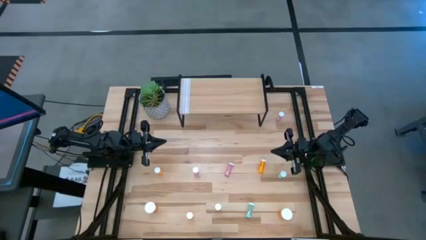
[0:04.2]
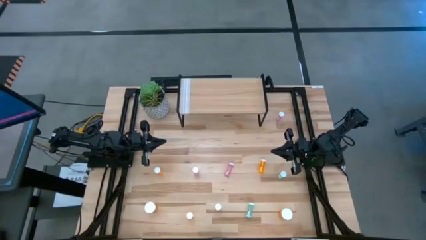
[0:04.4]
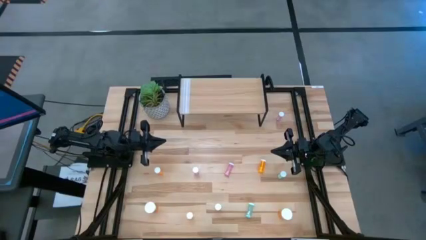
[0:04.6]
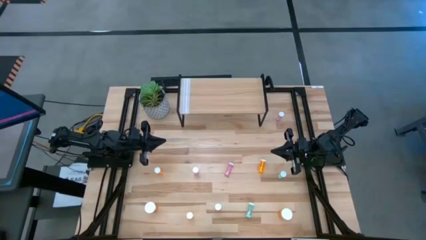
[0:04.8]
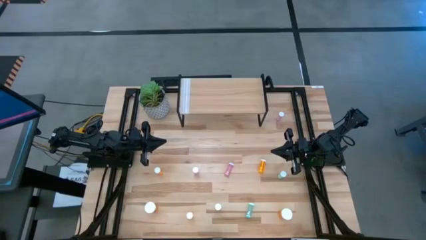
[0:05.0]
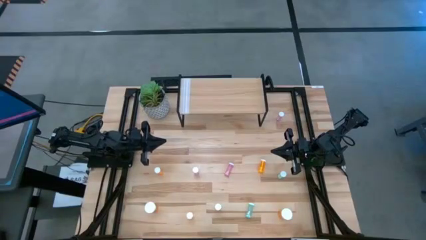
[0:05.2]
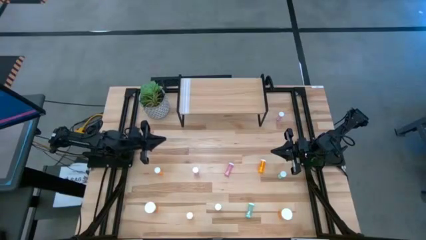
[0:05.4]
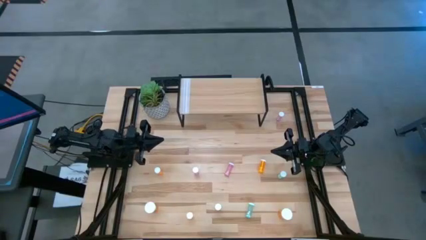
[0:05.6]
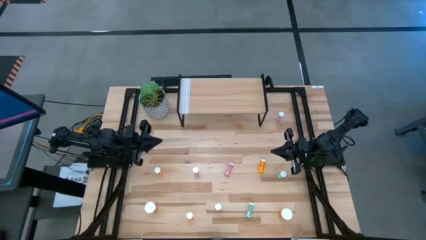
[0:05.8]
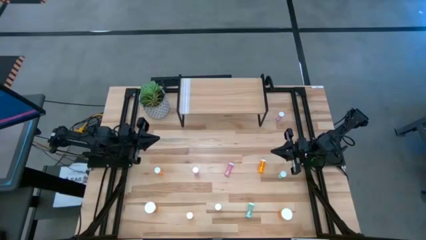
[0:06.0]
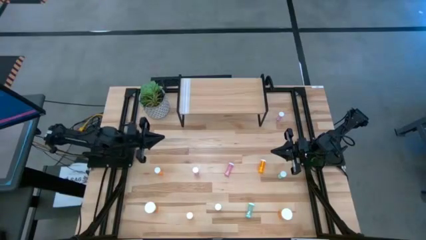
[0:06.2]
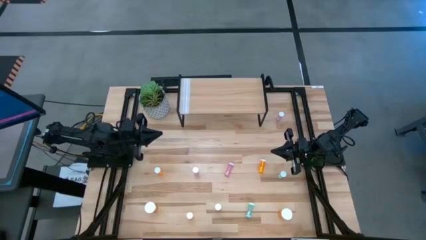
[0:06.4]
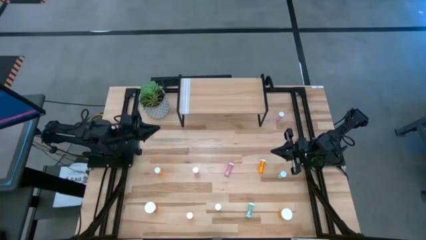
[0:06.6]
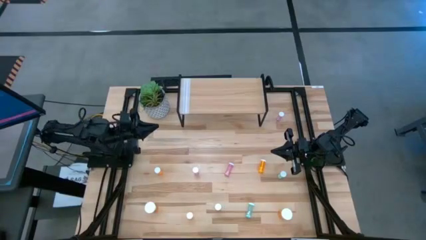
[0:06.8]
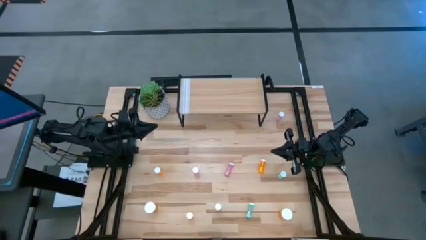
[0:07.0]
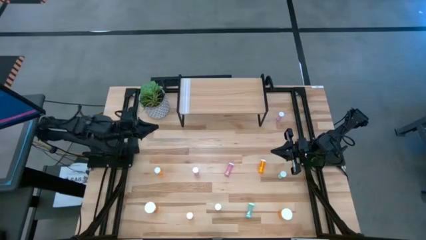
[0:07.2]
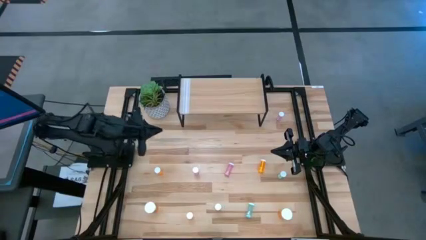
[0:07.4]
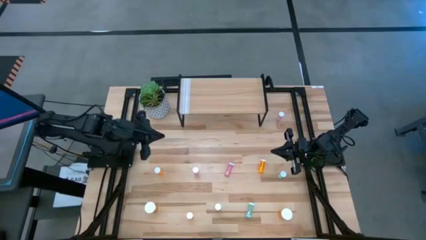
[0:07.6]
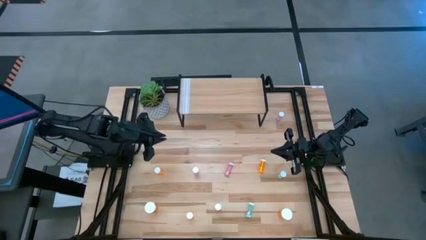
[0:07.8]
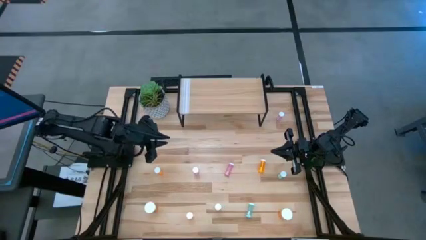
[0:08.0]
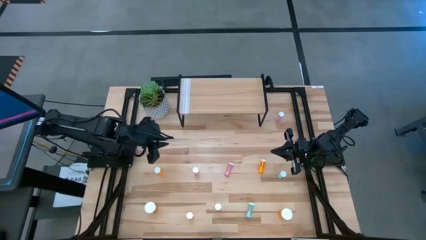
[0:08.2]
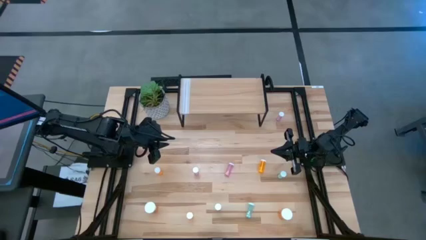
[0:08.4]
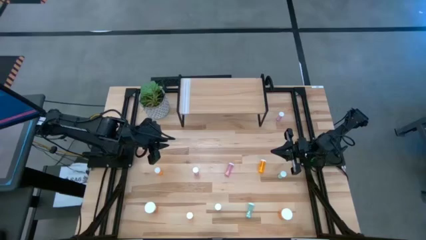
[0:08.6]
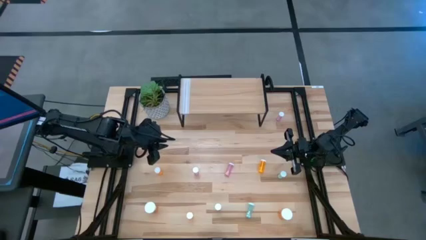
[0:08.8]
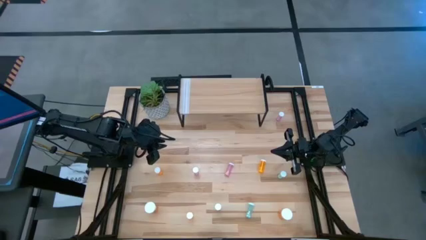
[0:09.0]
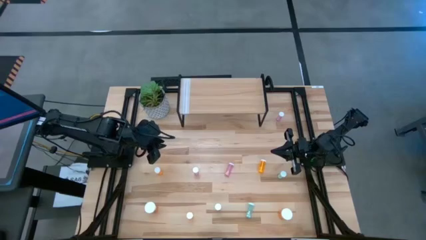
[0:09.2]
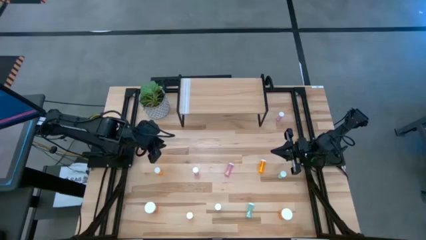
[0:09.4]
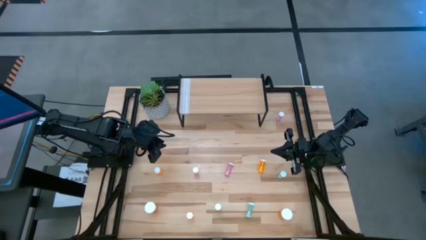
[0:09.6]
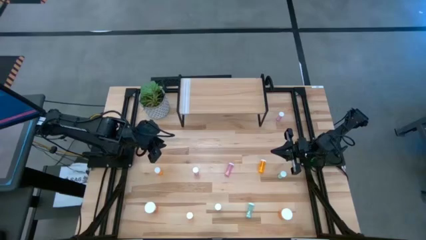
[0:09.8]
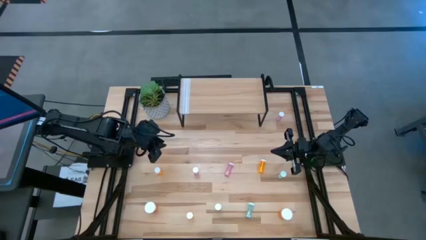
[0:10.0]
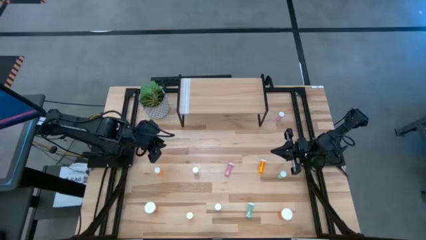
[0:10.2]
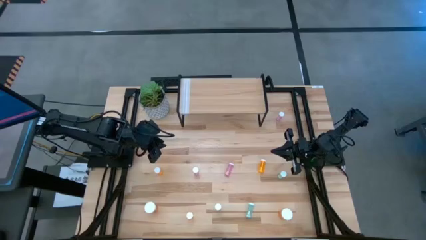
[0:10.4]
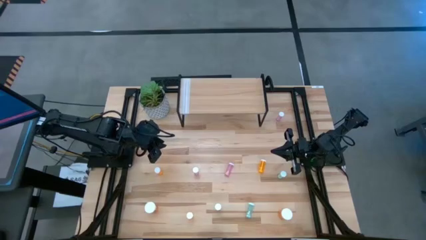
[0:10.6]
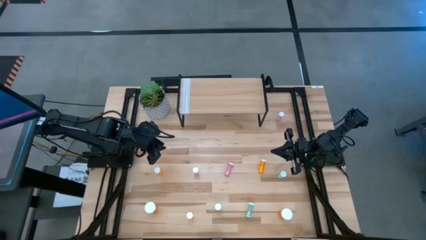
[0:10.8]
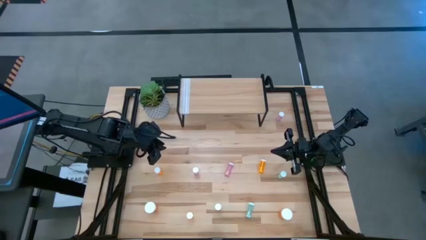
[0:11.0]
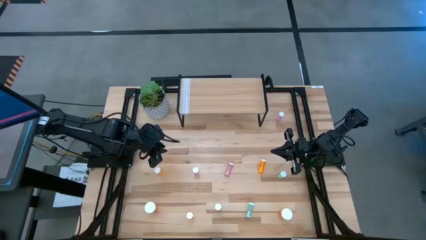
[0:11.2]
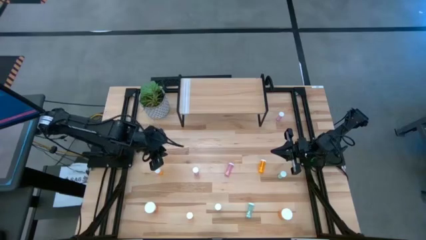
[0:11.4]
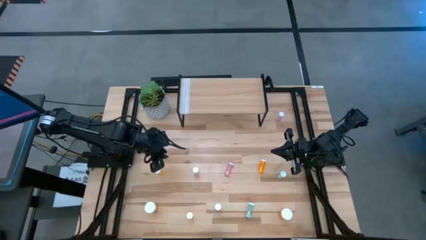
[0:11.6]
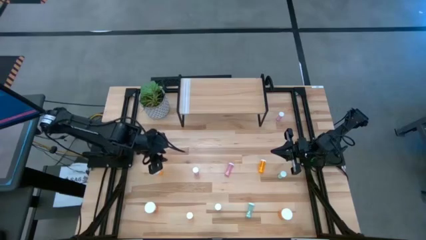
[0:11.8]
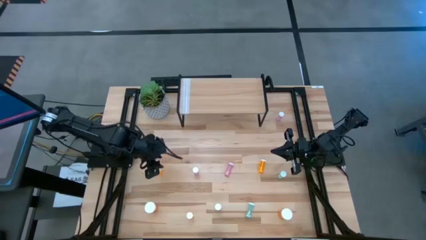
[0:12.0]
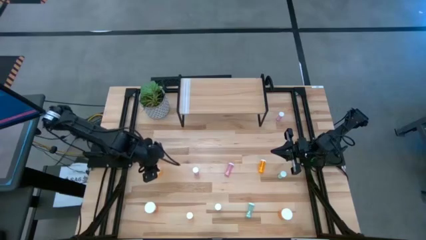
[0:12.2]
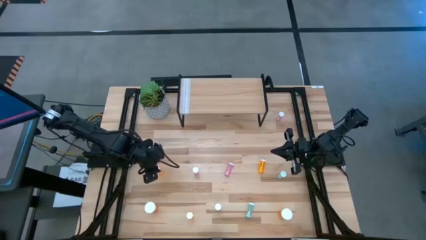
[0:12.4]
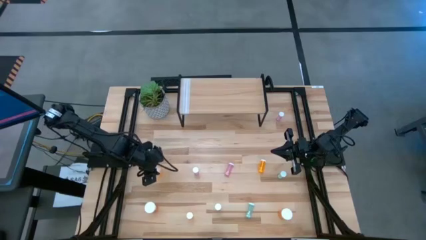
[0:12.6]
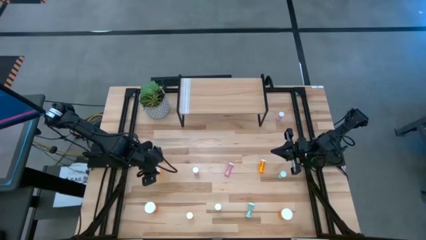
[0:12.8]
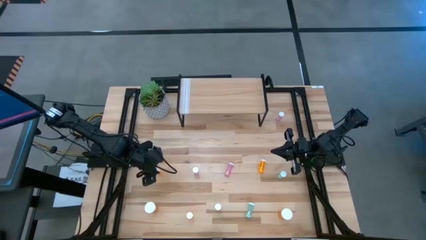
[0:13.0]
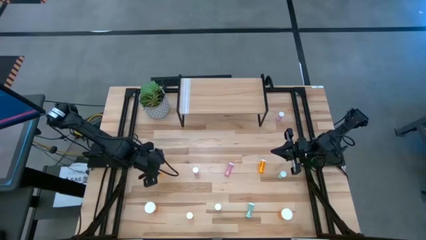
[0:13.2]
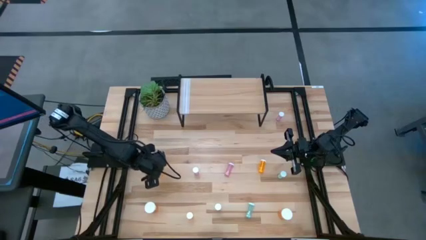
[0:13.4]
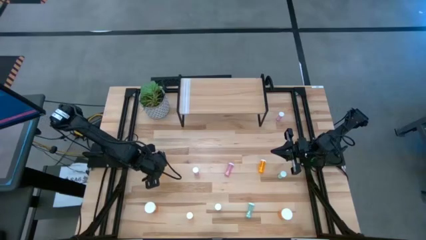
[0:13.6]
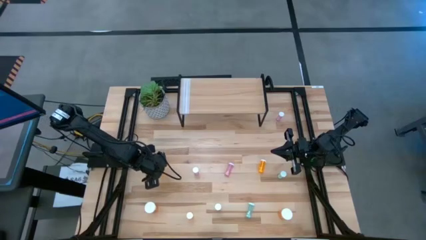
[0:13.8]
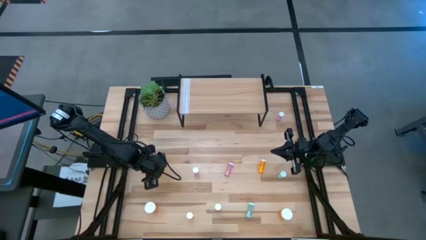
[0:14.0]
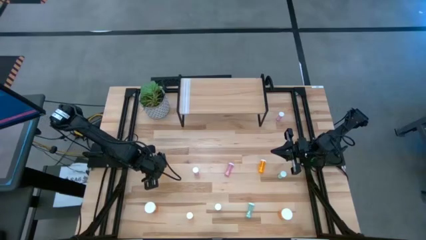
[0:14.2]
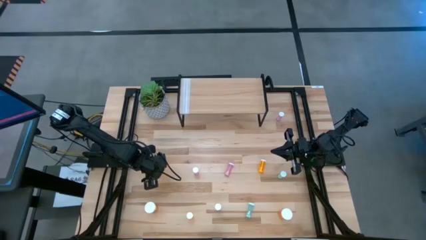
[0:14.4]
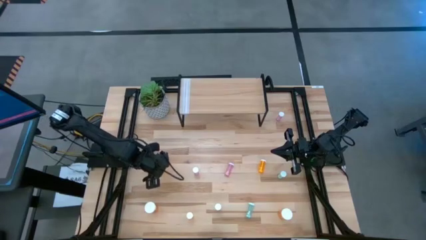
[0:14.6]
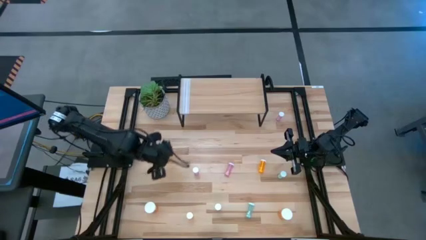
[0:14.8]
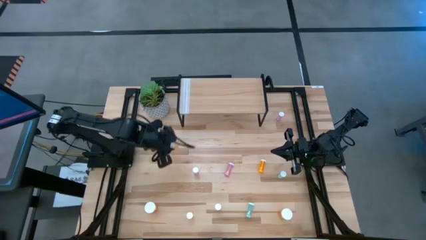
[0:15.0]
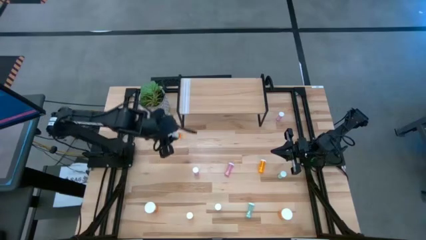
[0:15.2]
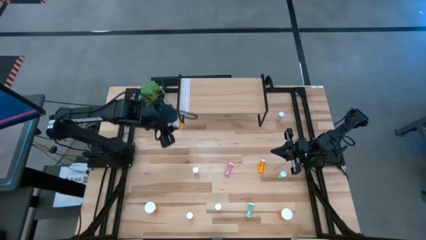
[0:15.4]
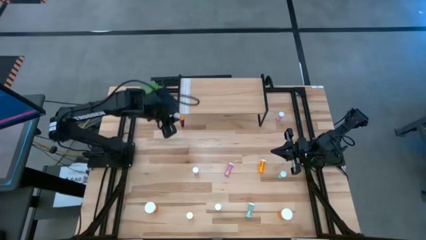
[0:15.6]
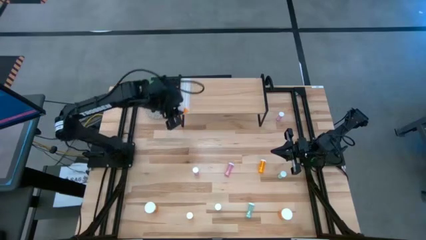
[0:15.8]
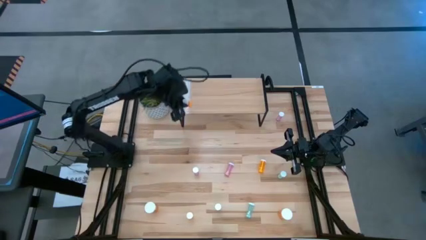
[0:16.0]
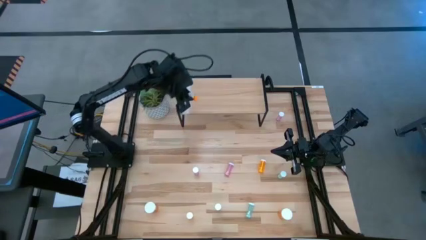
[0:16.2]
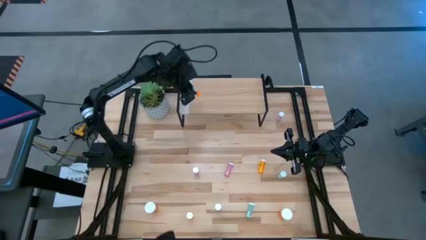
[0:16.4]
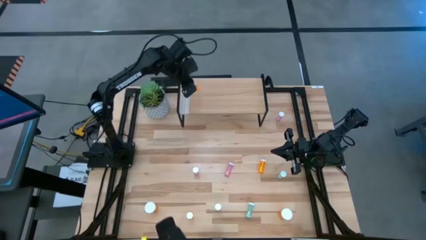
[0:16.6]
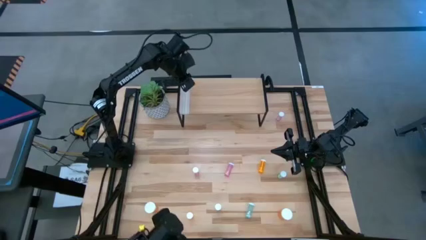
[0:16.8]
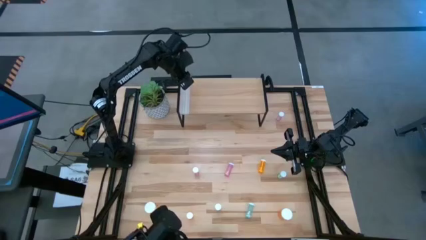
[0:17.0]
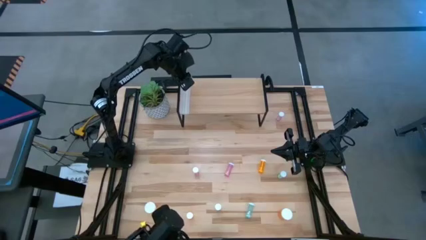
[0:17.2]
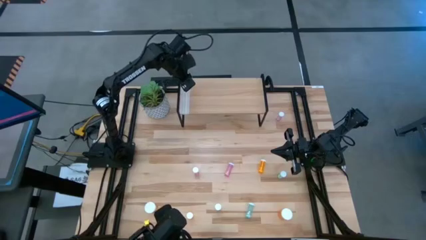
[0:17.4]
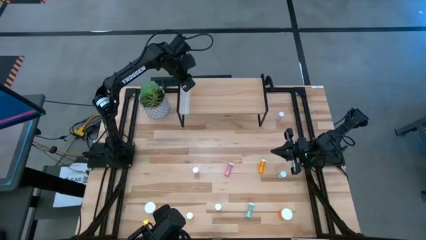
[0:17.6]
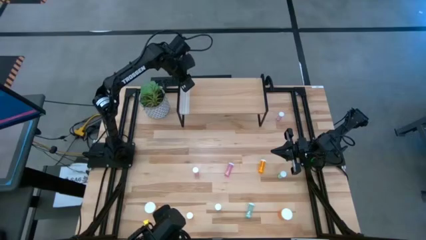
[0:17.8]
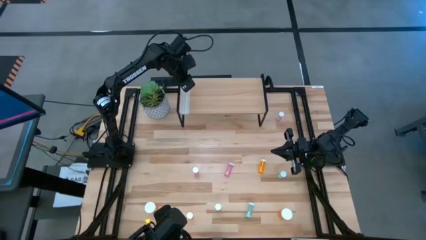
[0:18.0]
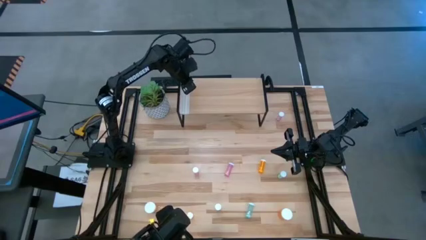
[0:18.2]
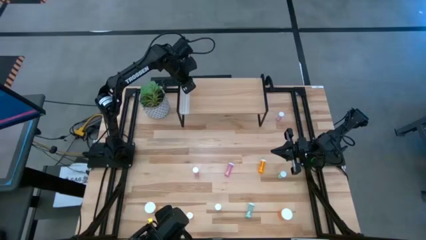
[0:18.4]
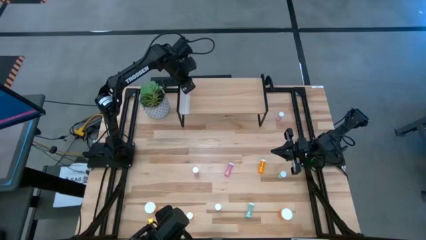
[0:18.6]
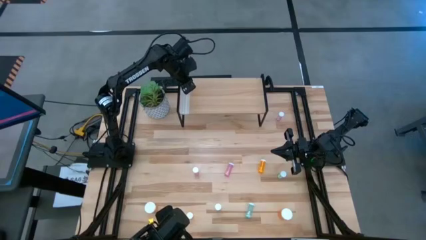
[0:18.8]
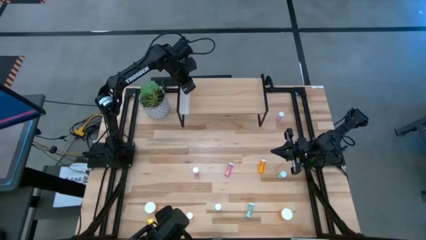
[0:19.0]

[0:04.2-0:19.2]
Task: Pick and place medicine bottles onto shelf by color
Put the top left small orange pill bottle on the shelf
